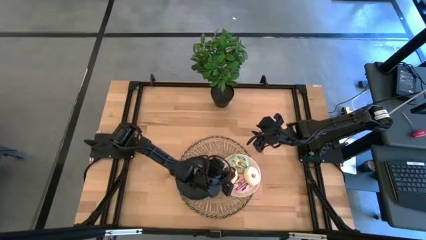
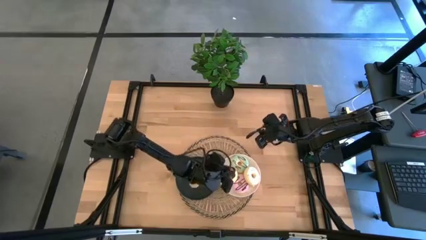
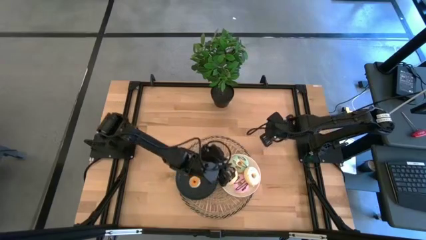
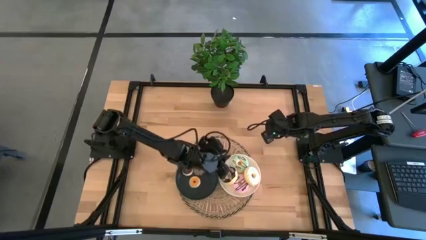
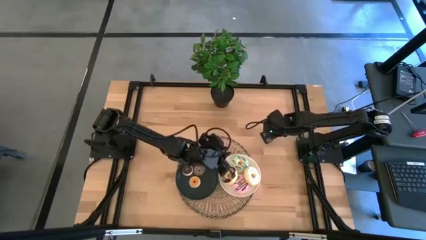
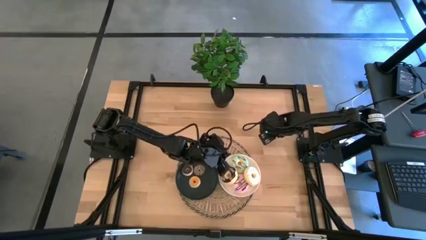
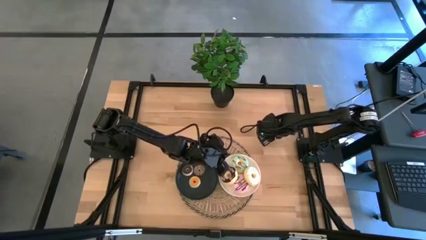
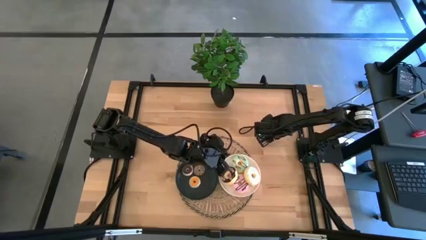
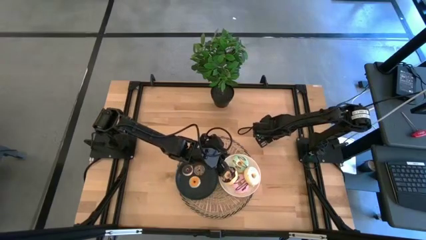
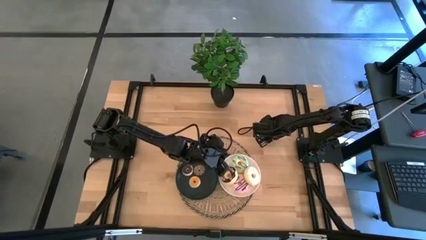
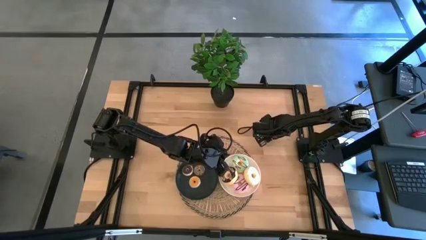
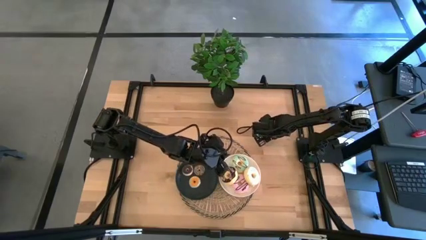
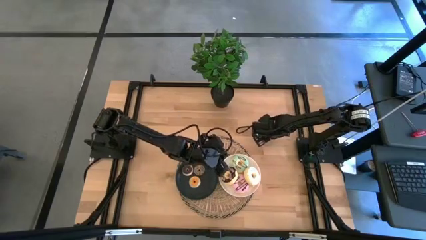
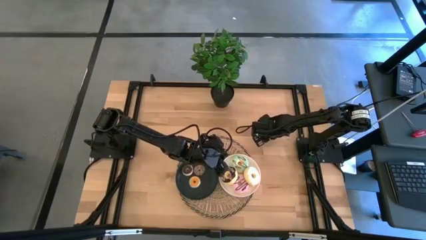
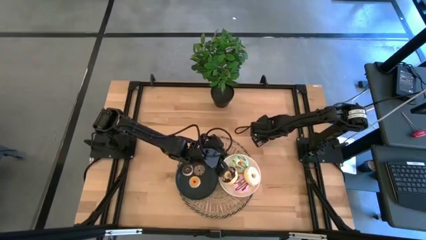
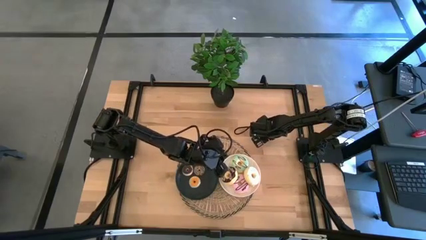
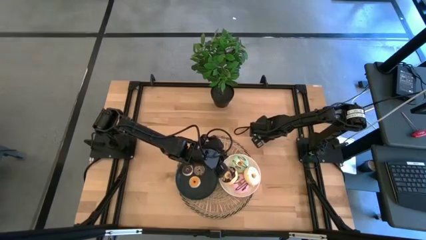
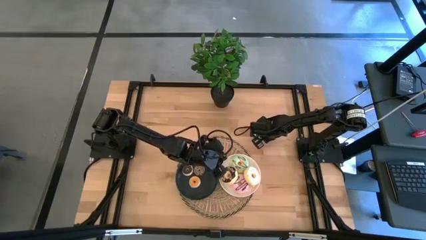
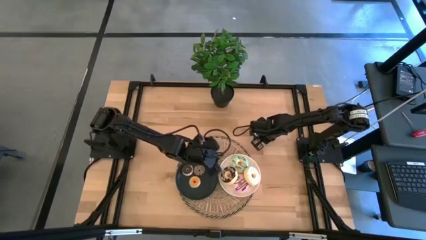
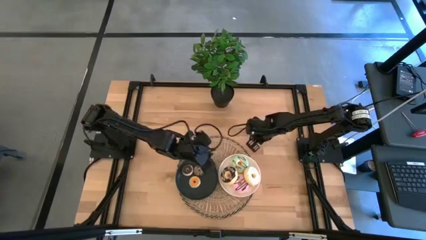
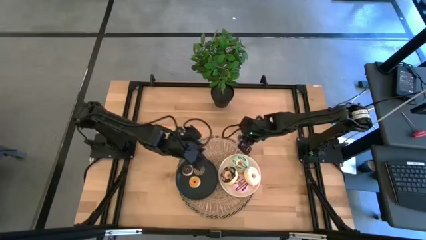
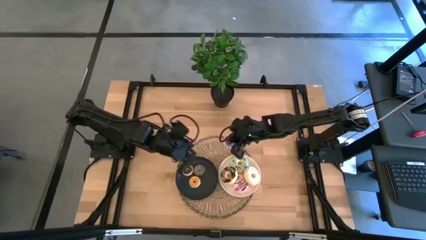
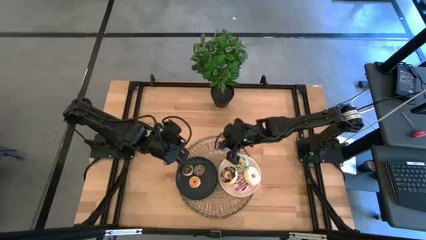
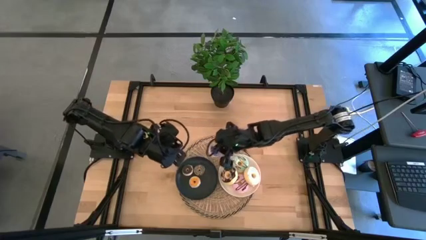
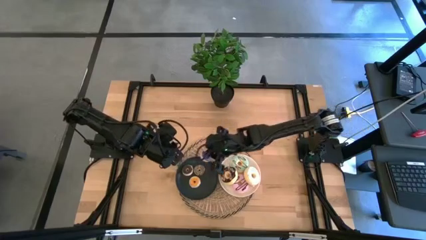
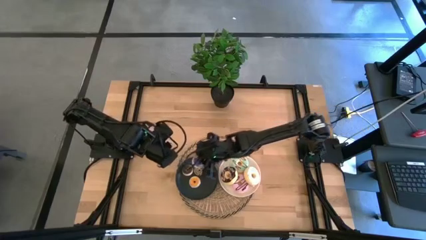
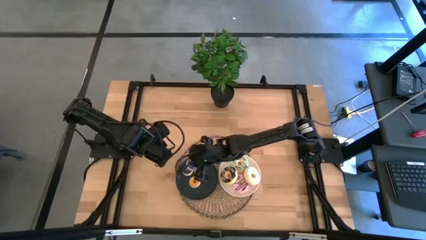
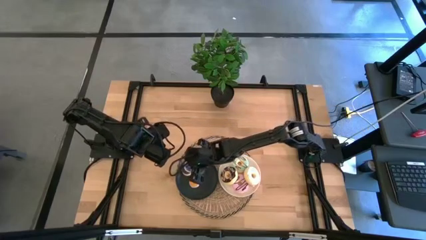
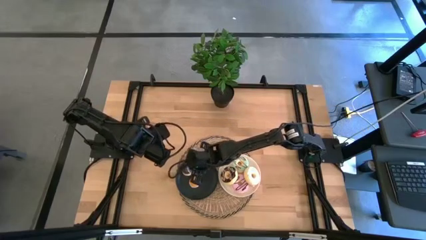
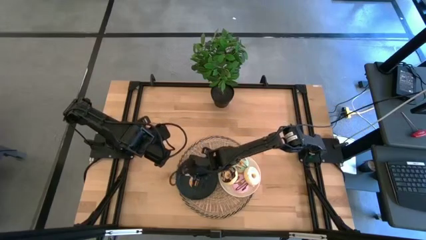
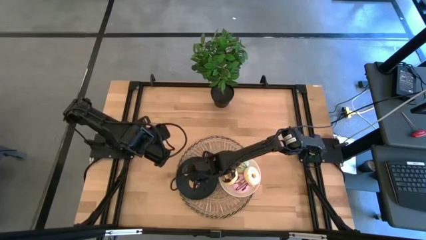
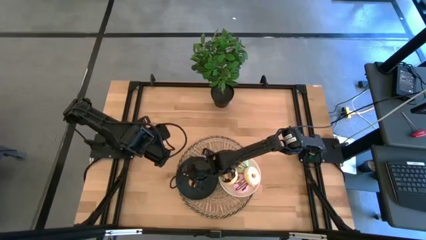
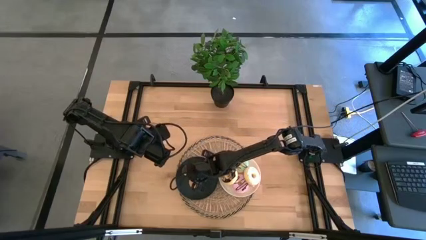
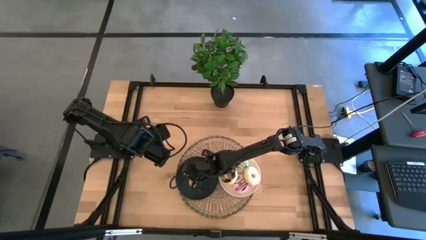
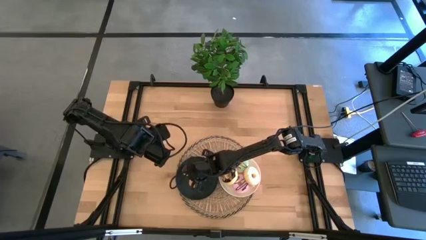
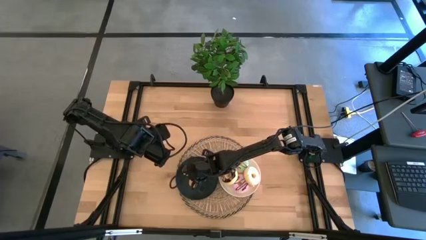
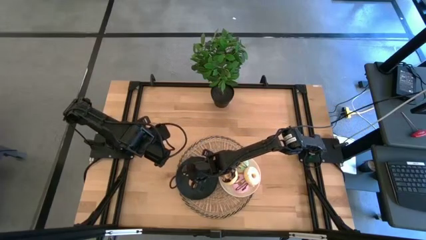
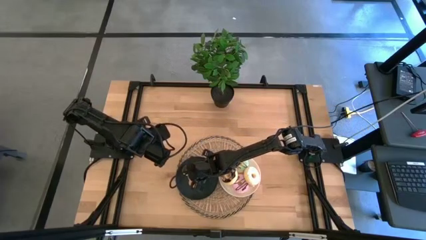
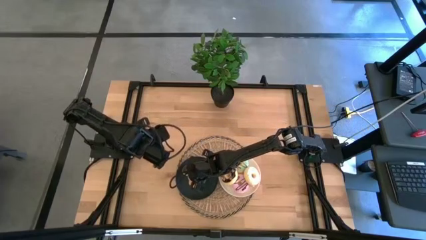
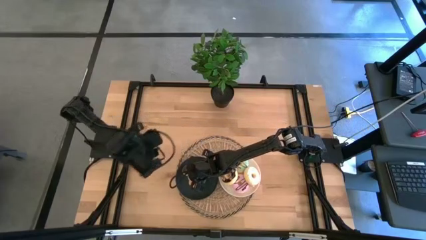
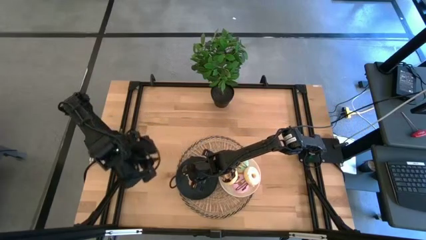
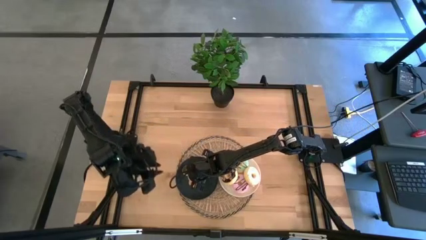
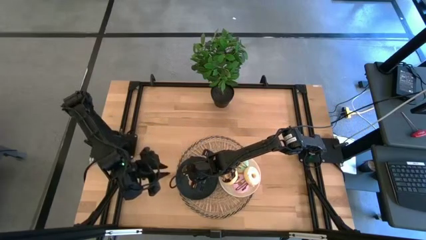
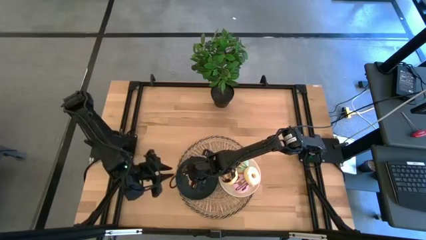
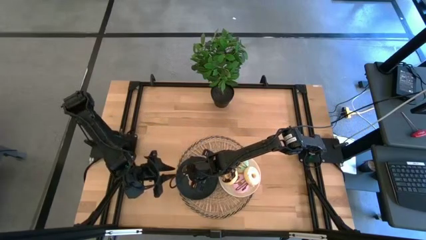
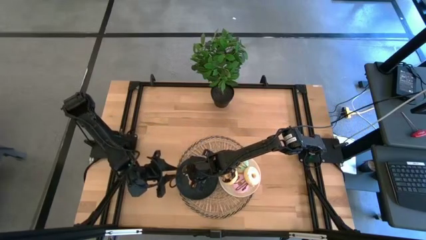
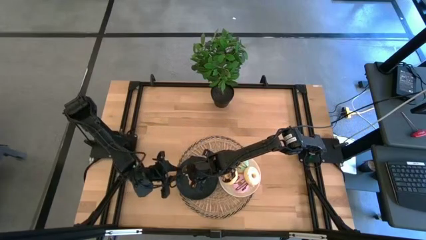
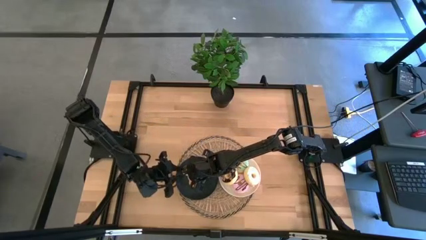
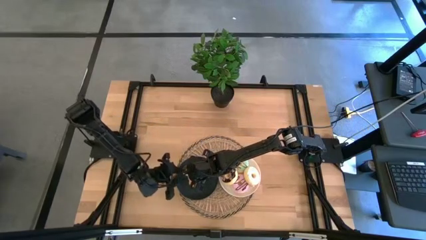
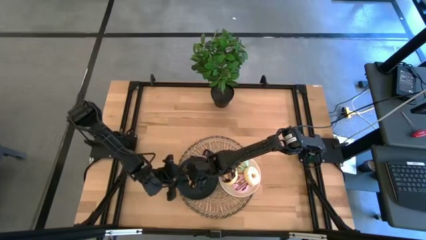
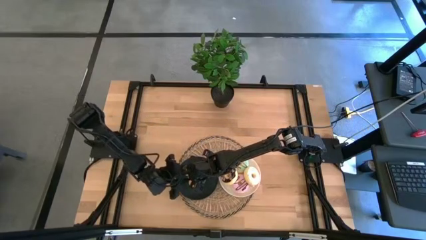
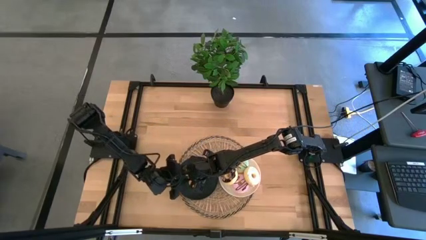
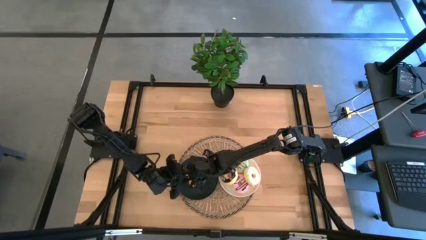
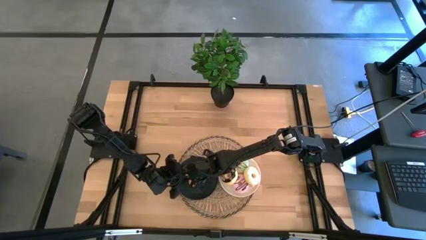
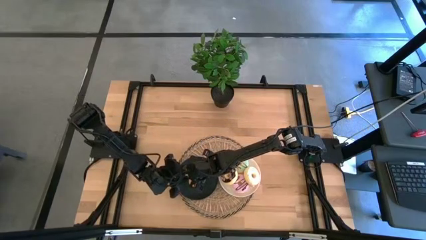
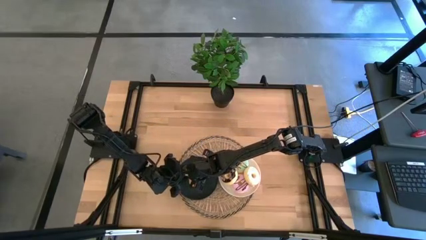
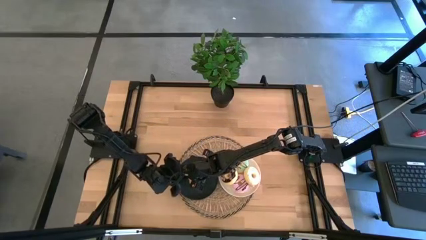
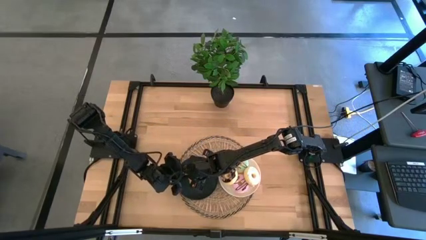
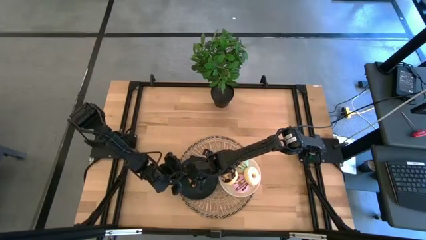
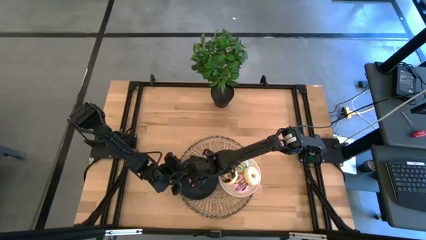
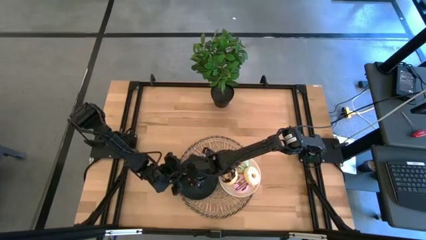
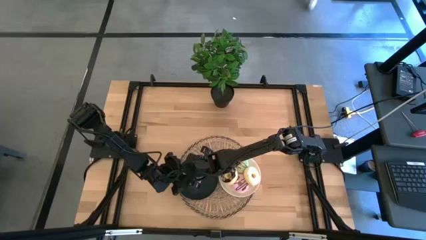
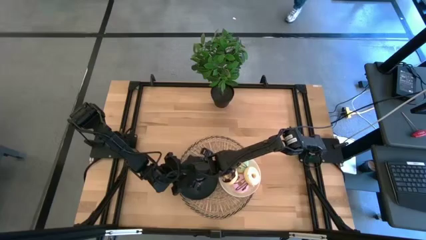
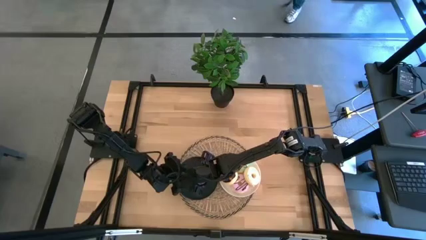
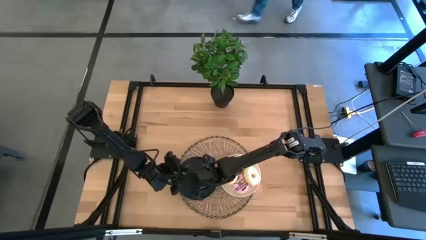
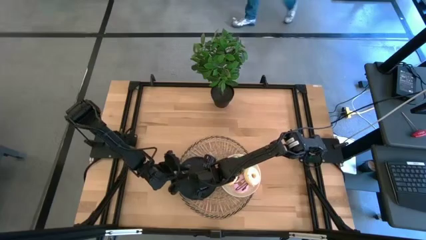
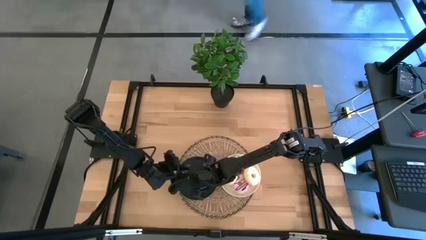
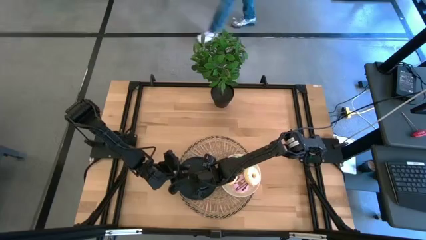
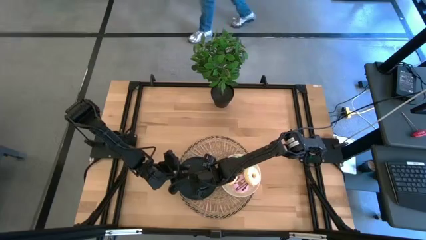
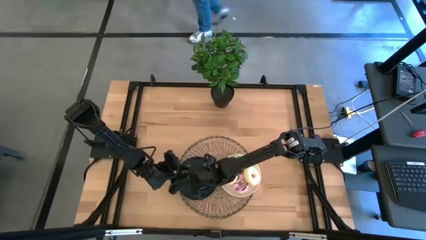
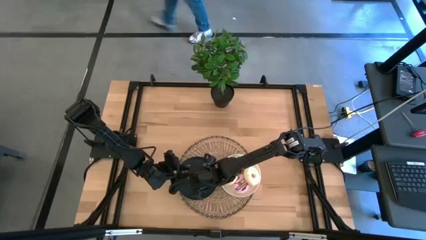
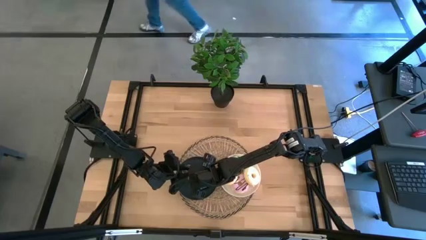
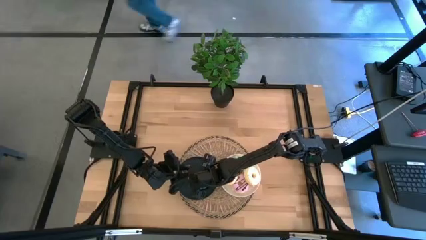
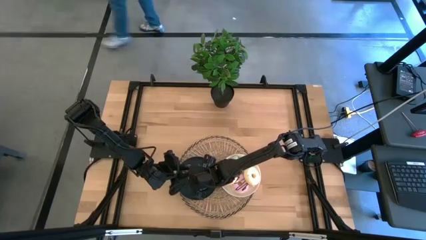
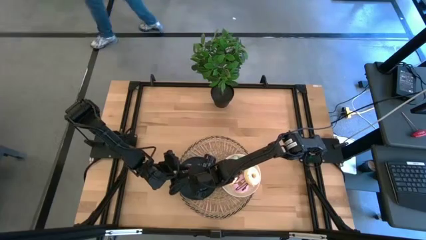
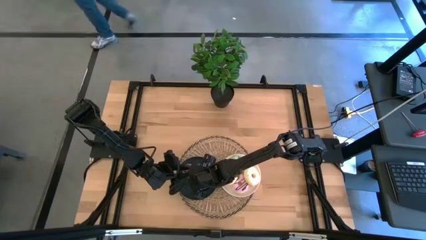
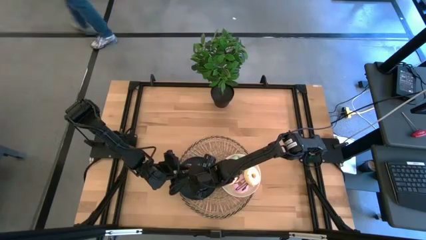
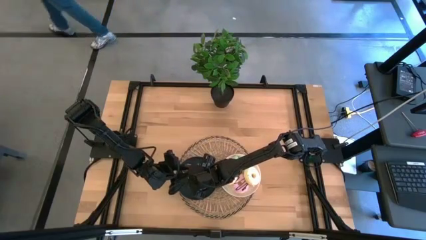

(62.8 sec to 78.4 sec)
Task: Pick & Place donuts
Put the small blue donut on the black plate
